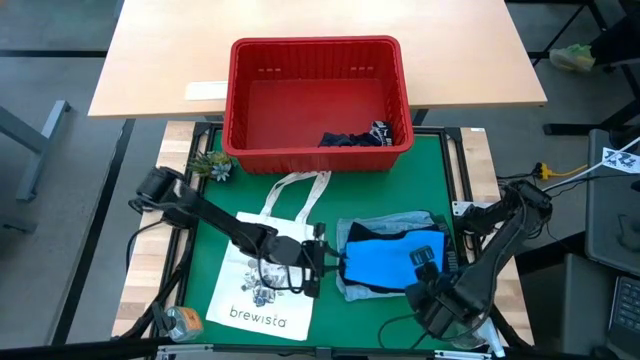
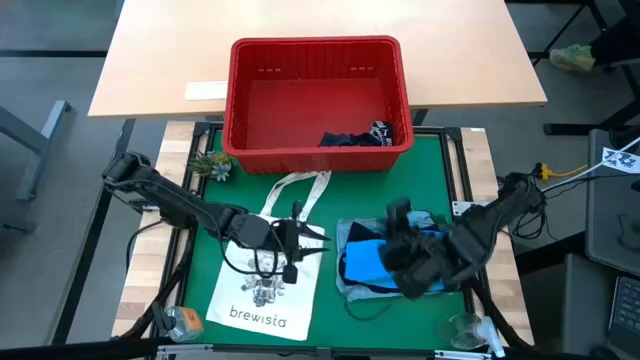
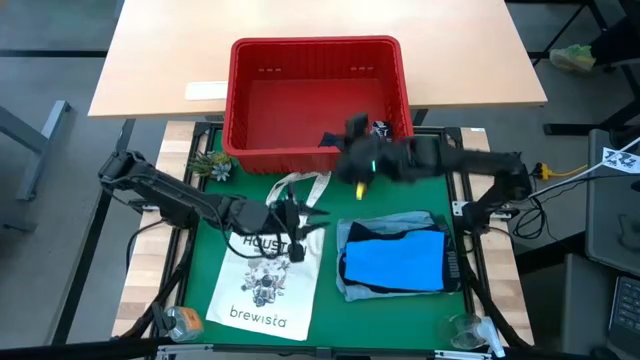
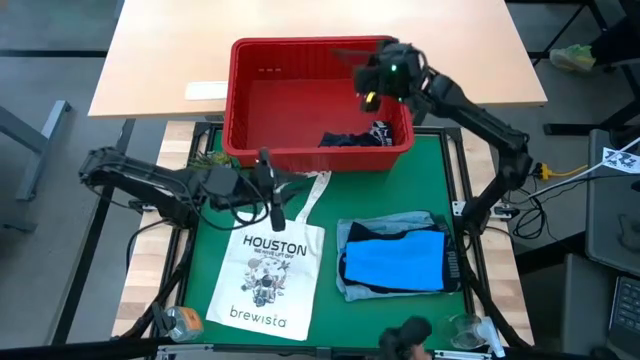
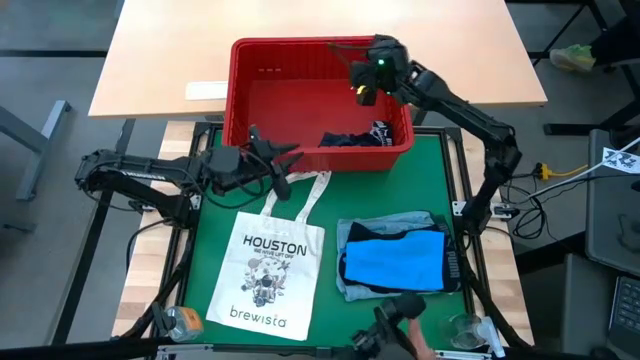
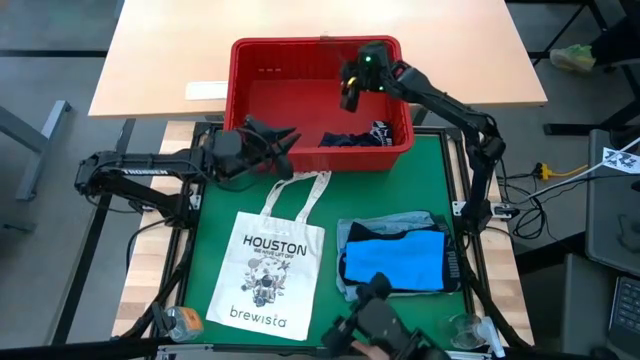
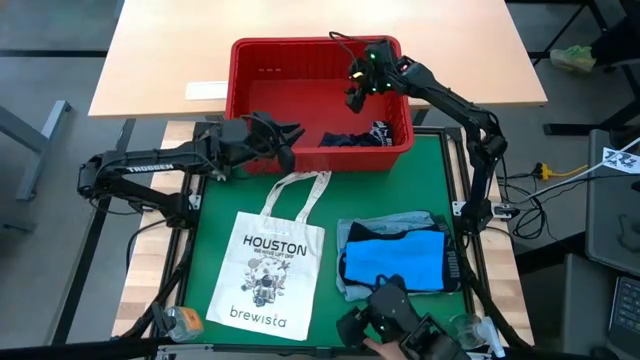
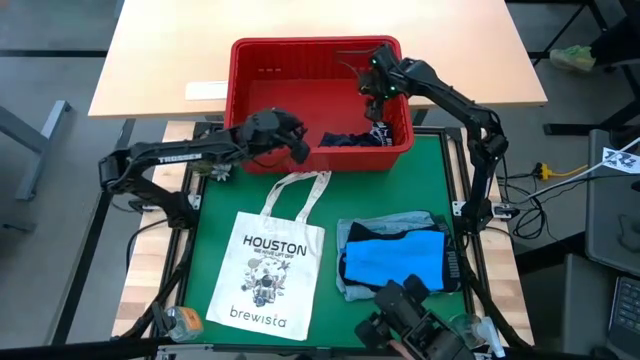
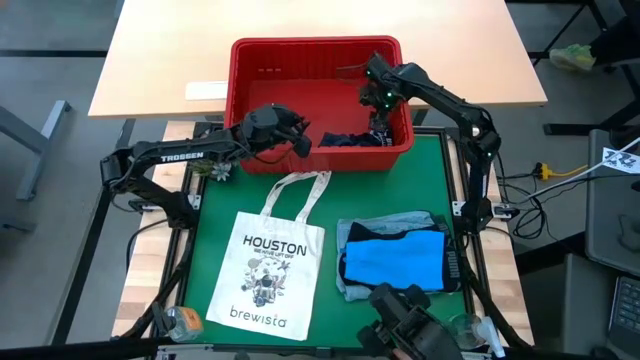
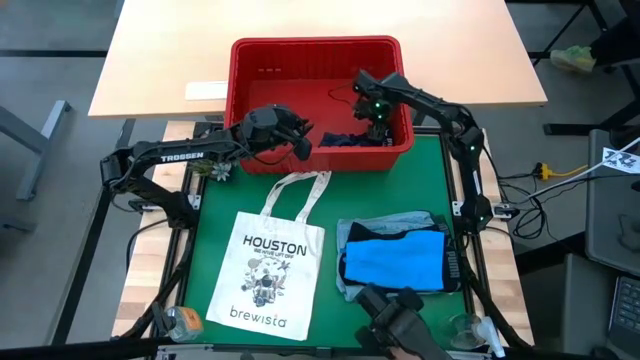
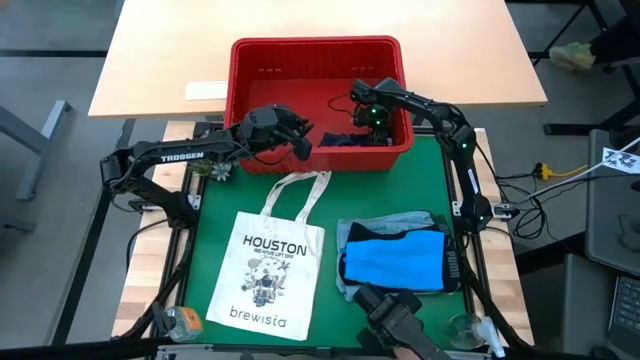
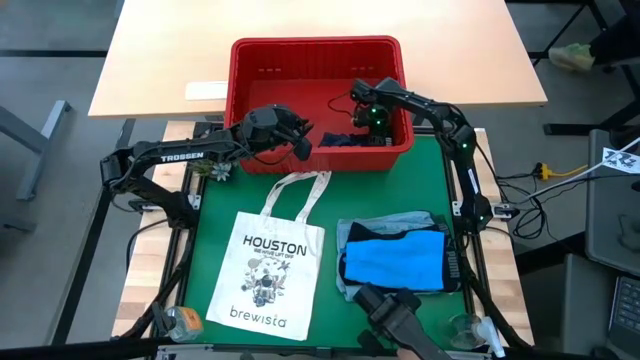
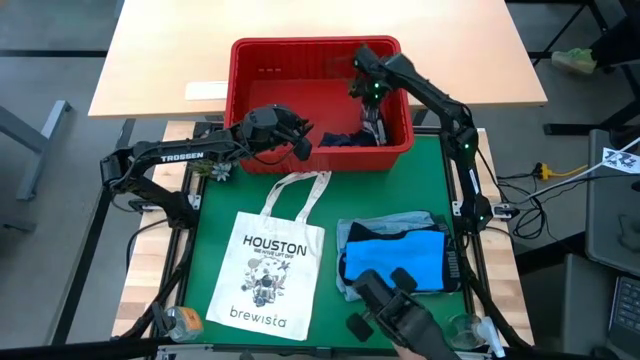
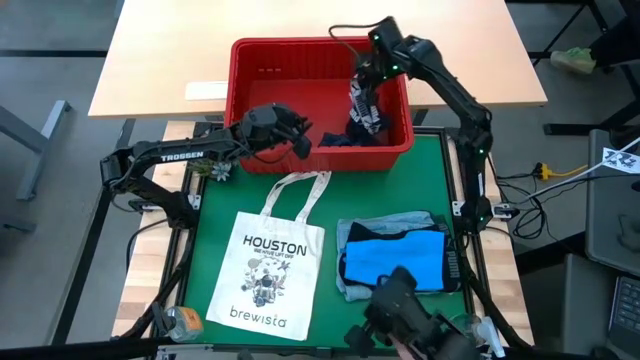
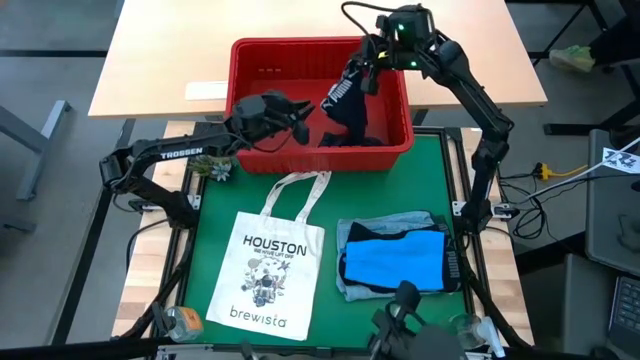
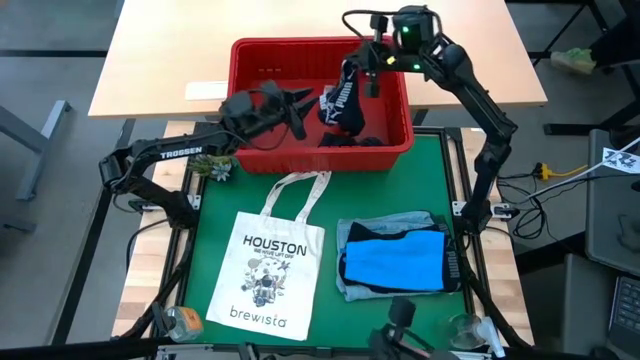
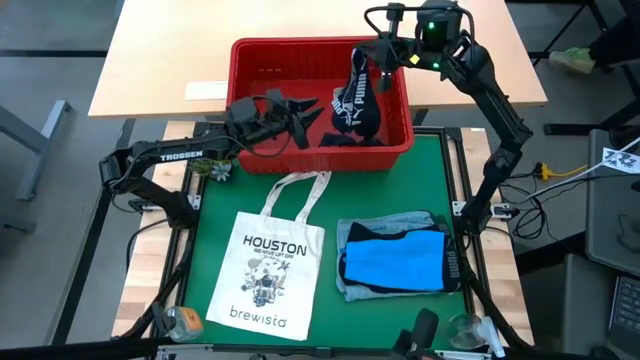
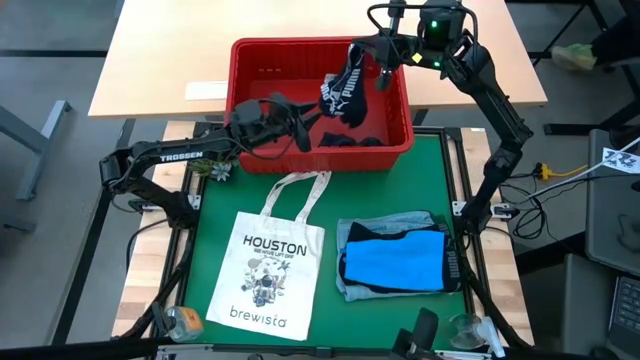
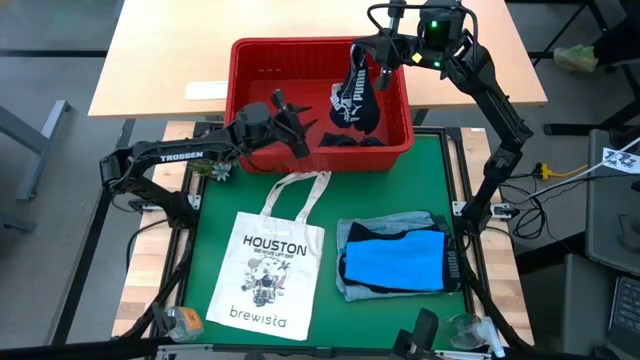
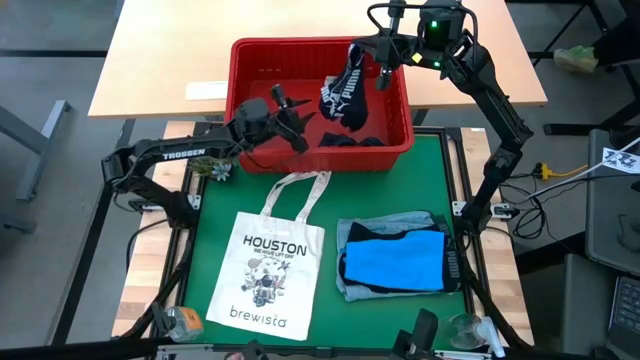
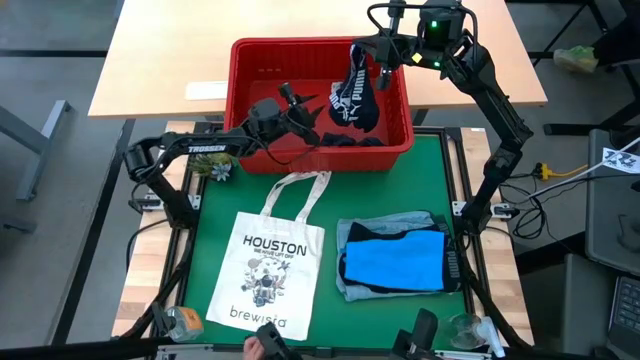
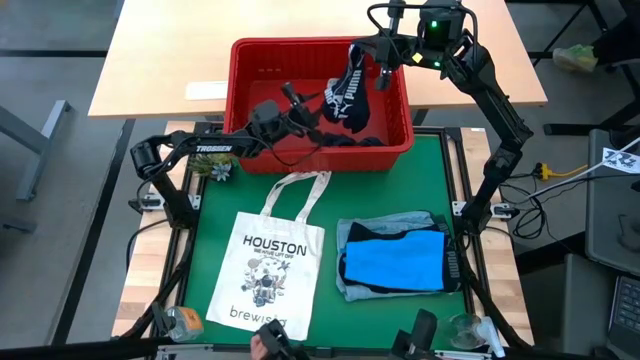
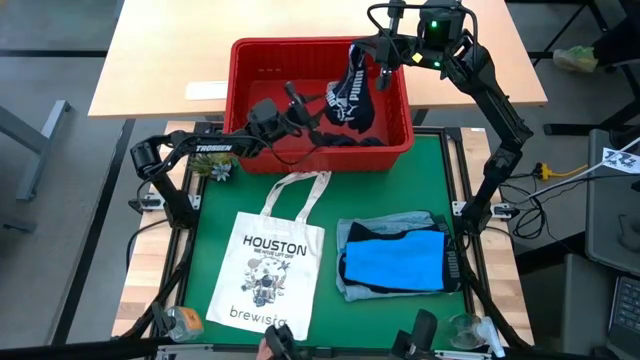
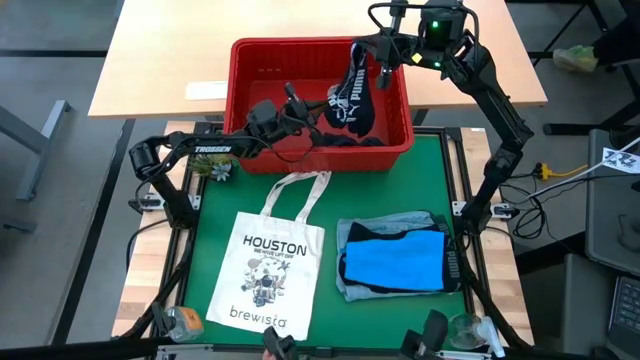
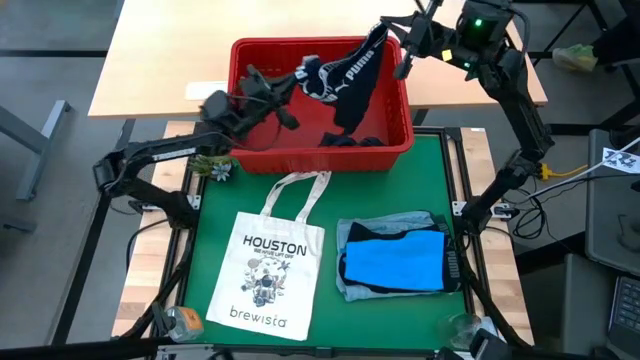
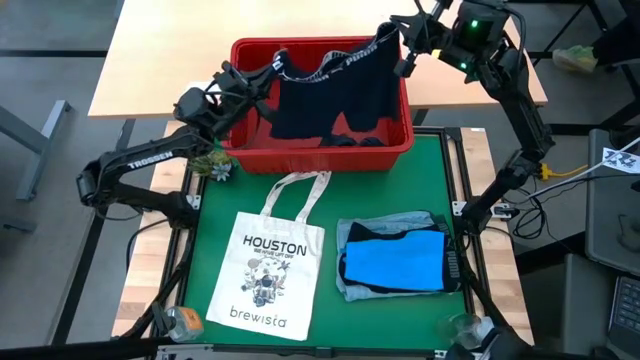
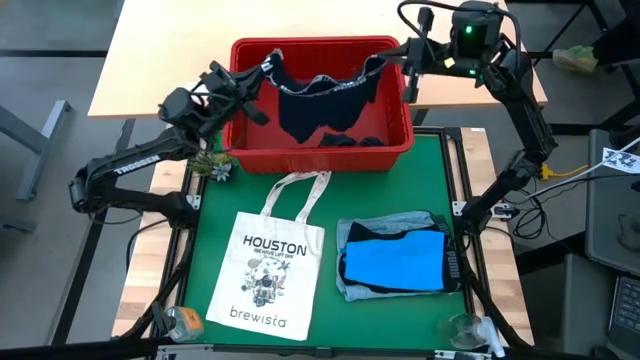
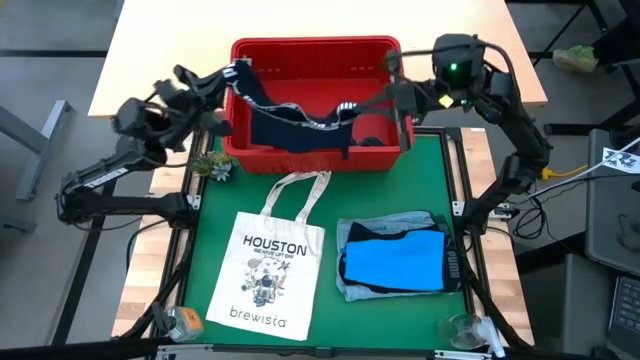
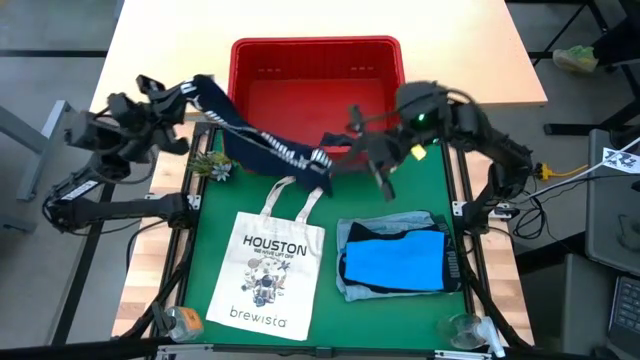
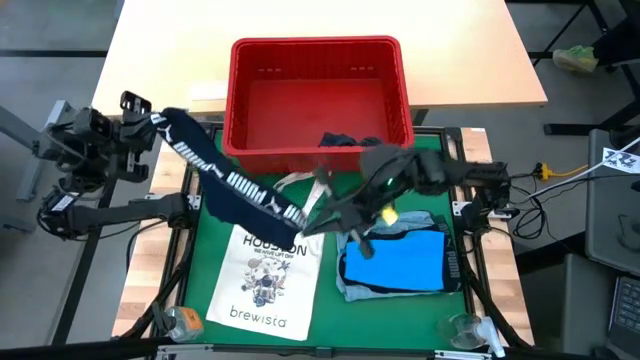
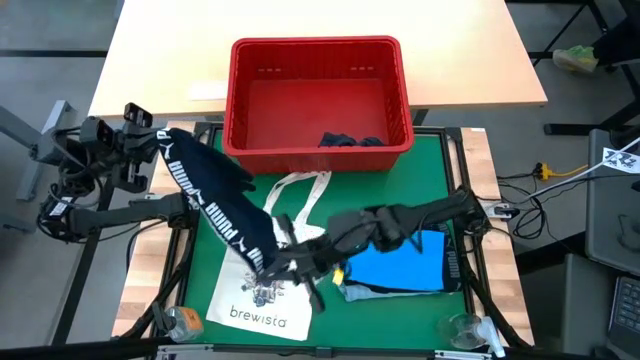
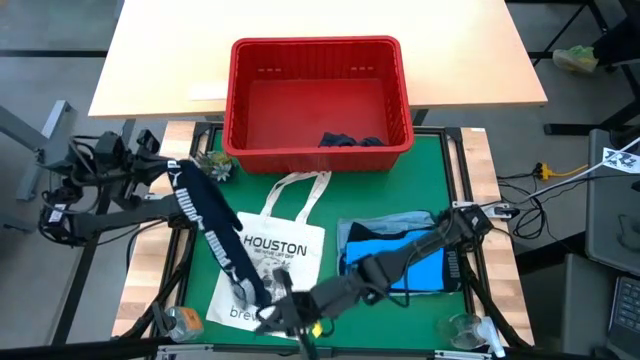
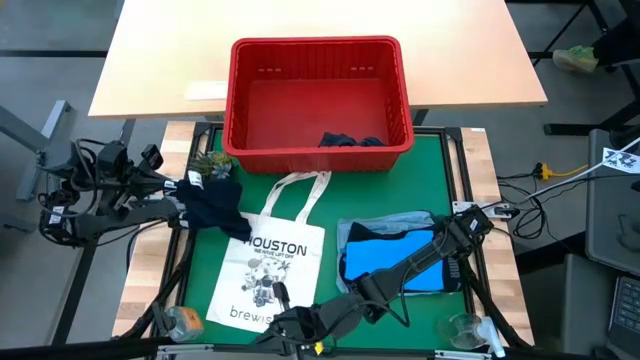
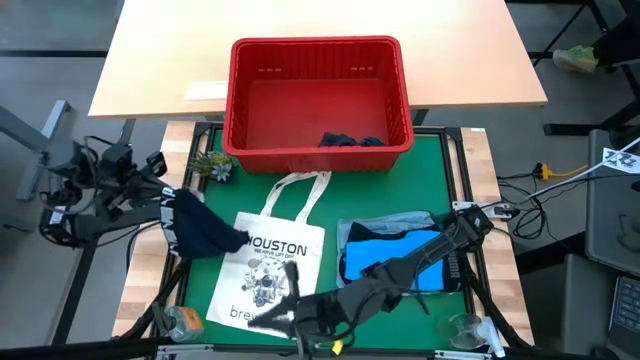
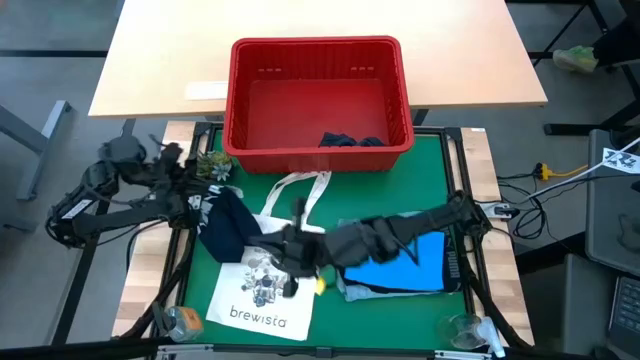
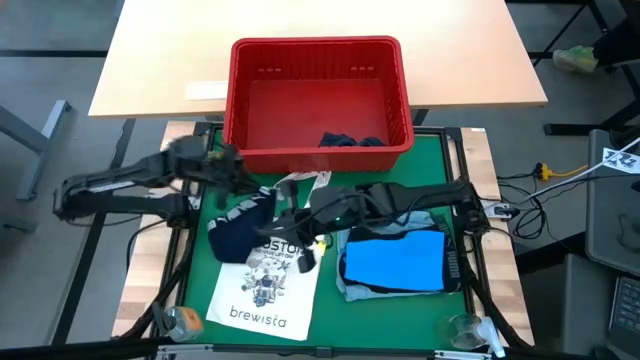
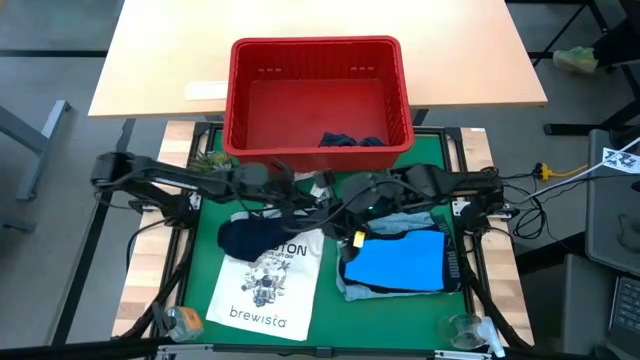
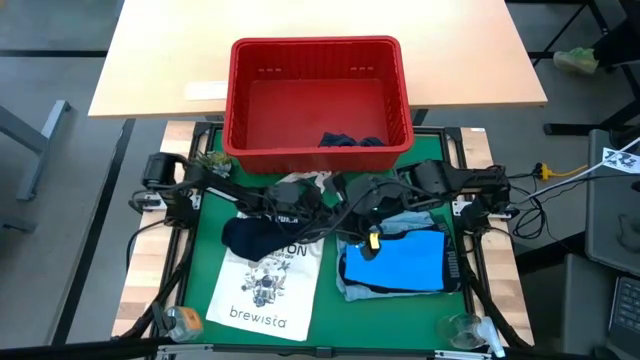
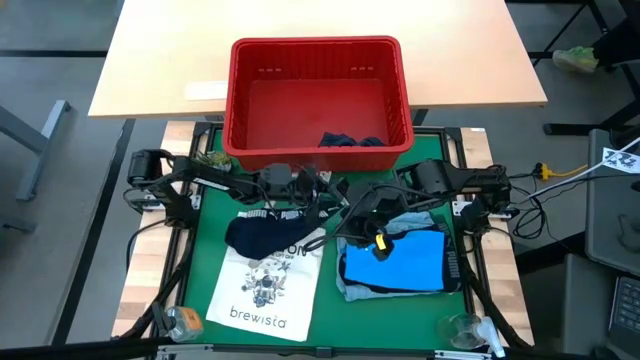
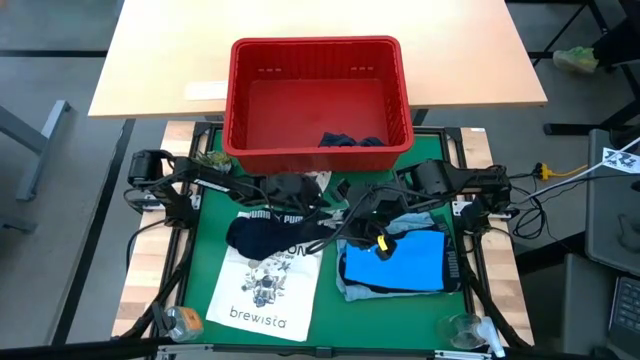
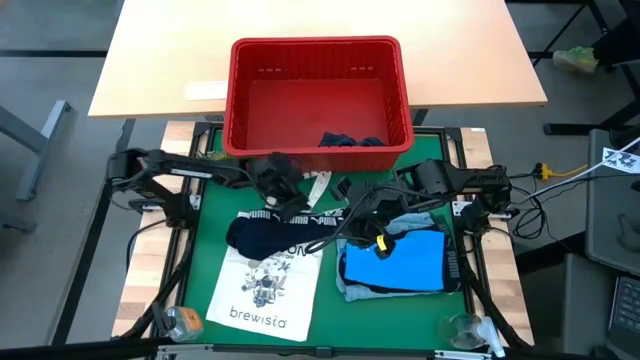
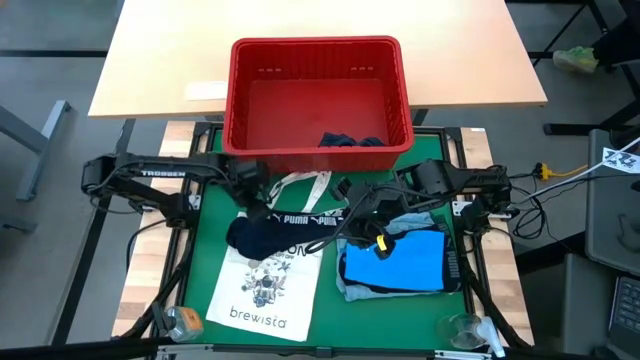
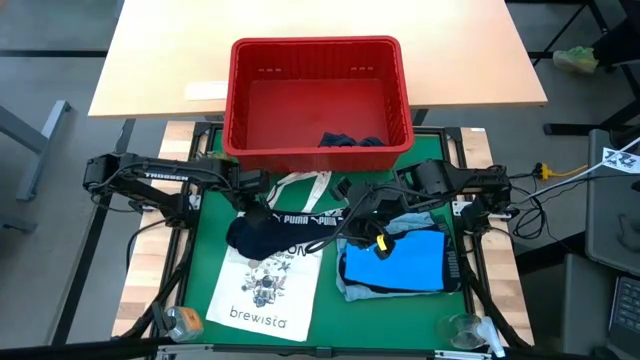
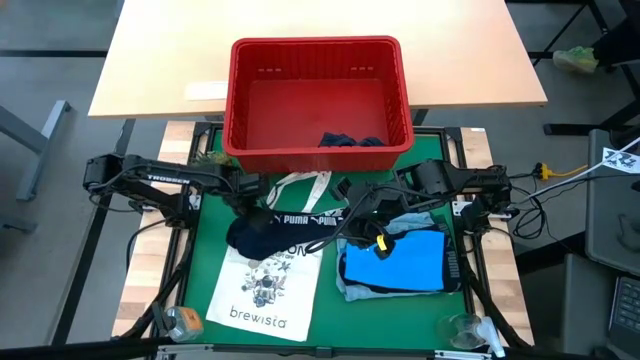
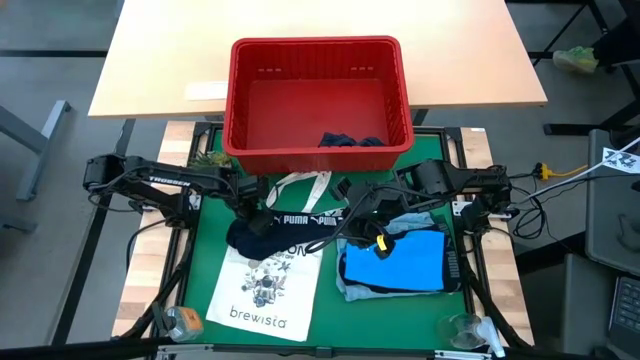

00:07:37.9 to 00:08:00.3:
Task: Fold Laundry from Bin
Fold the dark blue boxer
